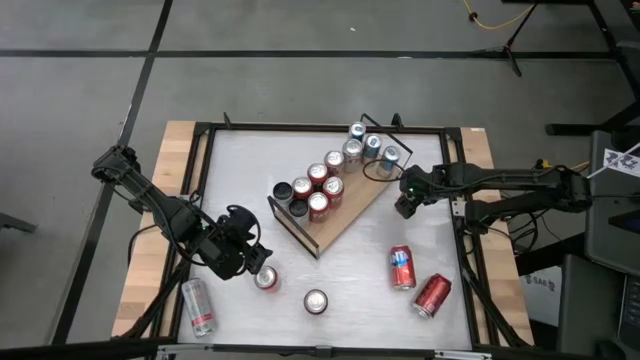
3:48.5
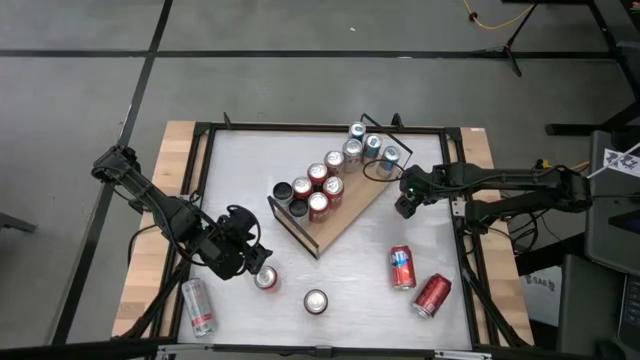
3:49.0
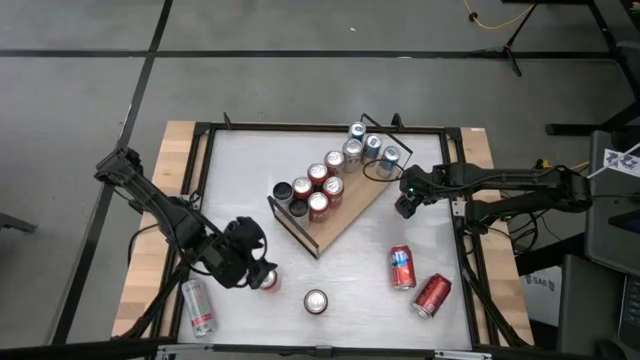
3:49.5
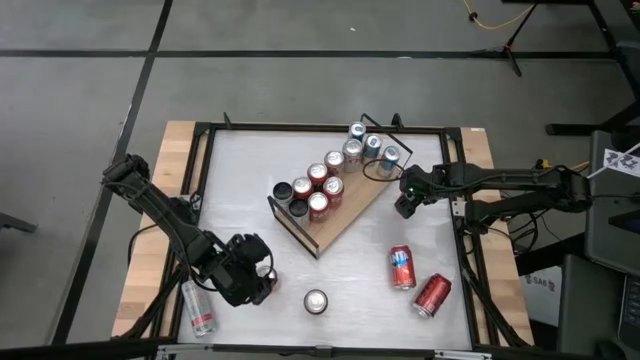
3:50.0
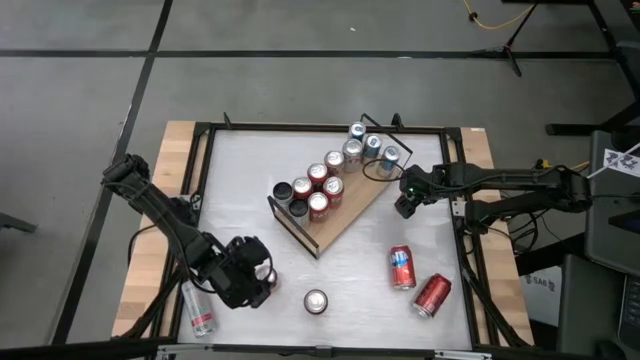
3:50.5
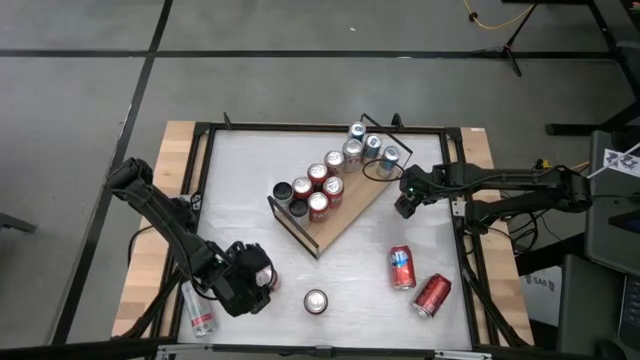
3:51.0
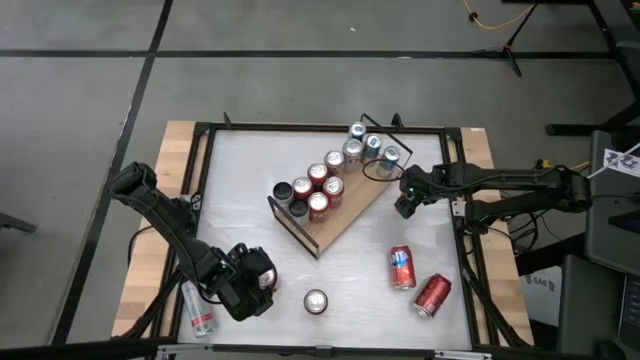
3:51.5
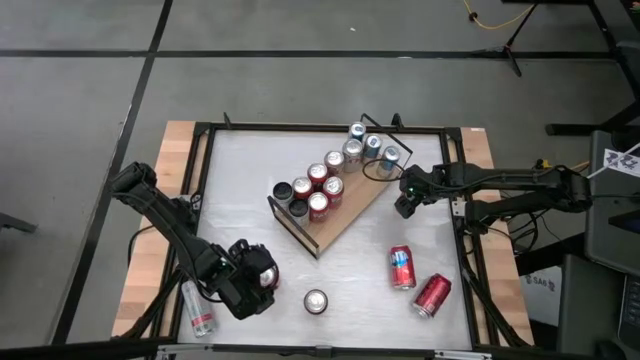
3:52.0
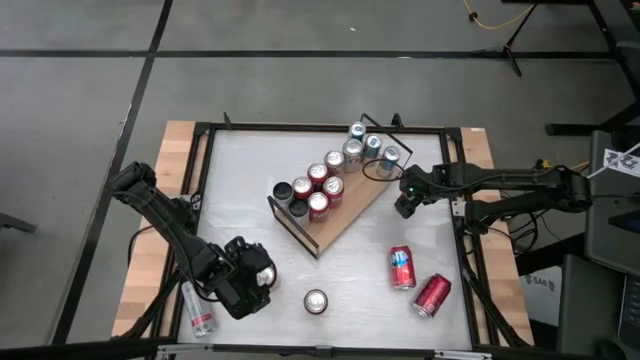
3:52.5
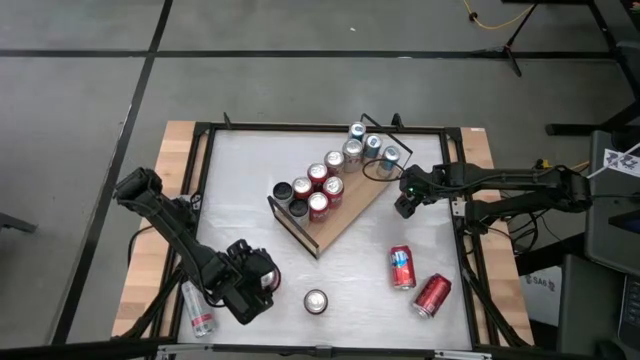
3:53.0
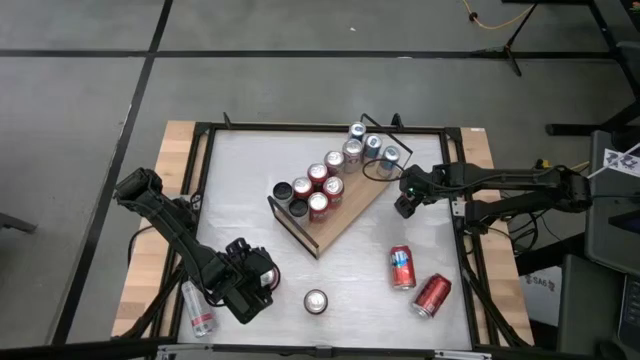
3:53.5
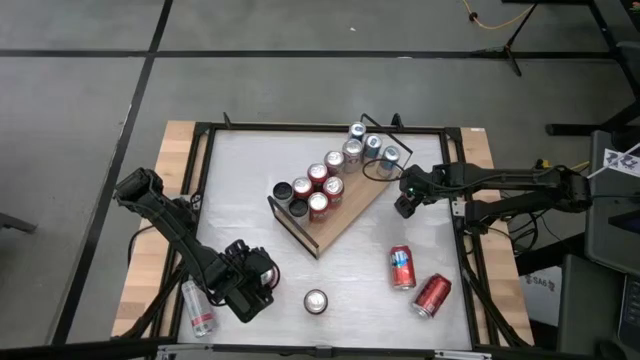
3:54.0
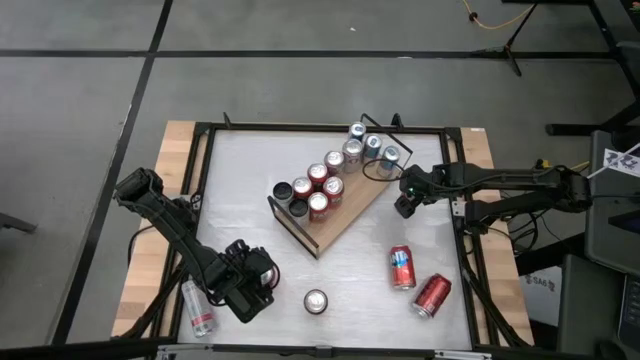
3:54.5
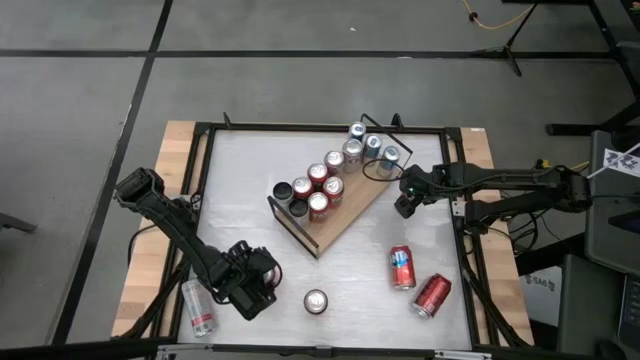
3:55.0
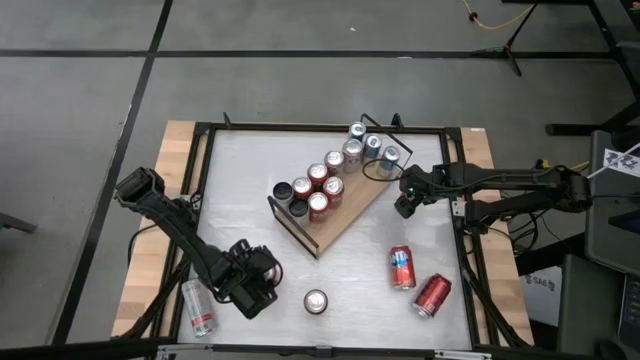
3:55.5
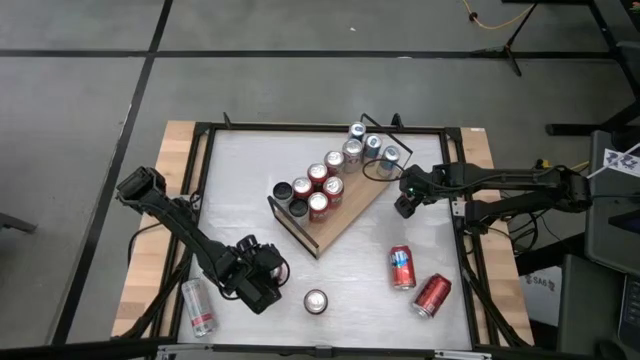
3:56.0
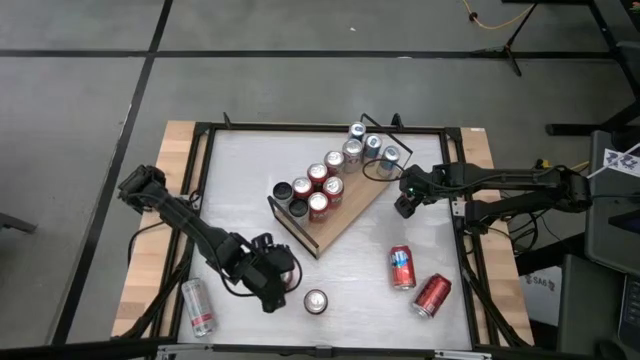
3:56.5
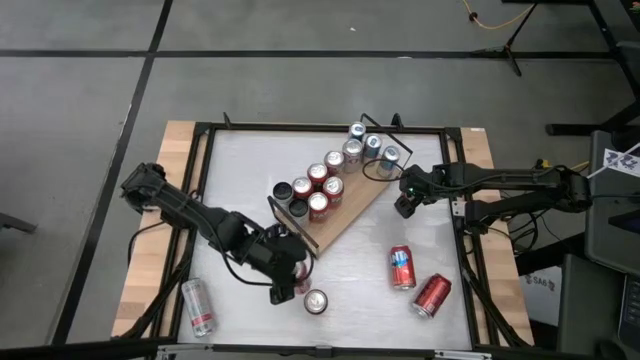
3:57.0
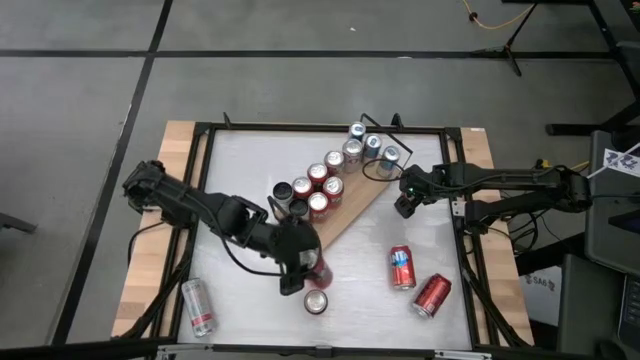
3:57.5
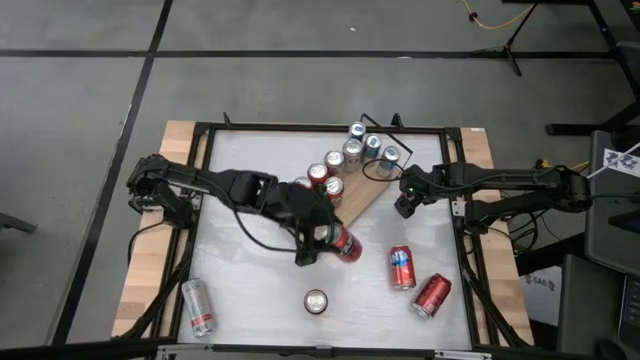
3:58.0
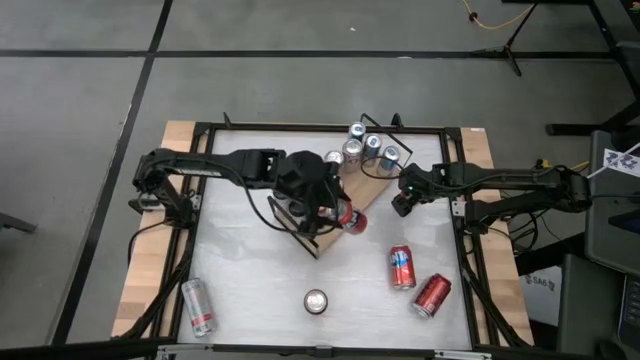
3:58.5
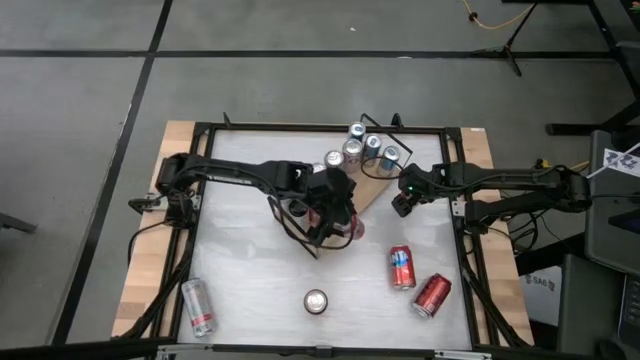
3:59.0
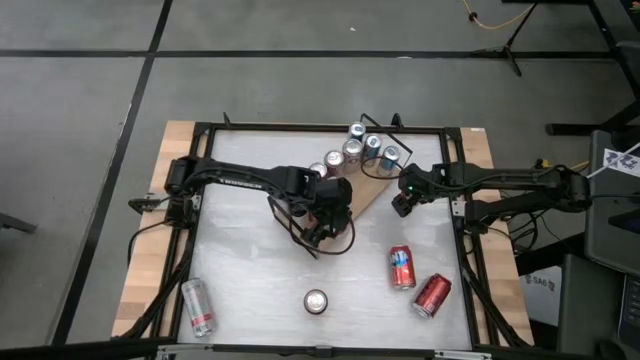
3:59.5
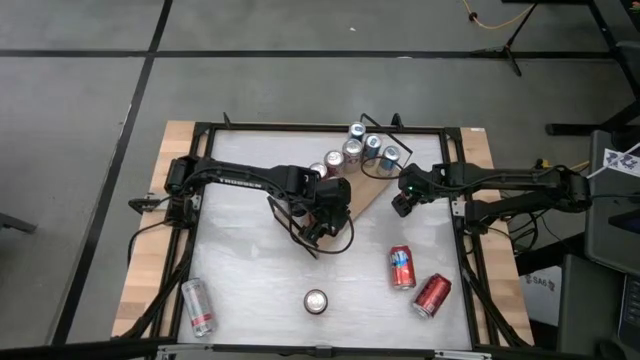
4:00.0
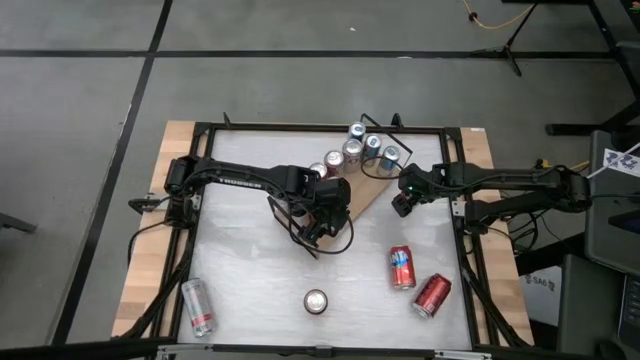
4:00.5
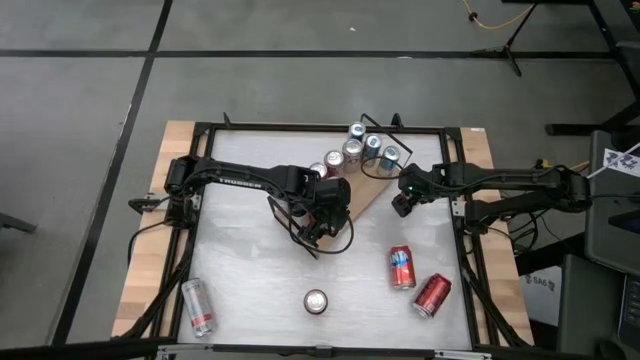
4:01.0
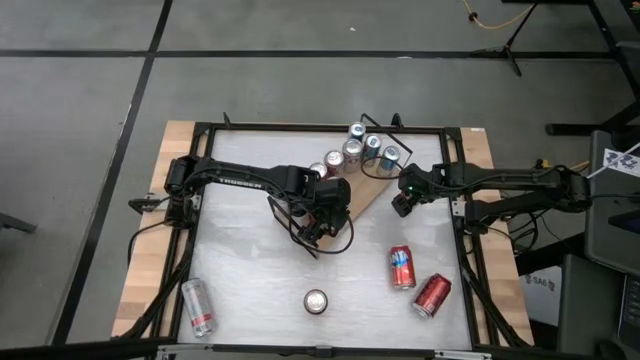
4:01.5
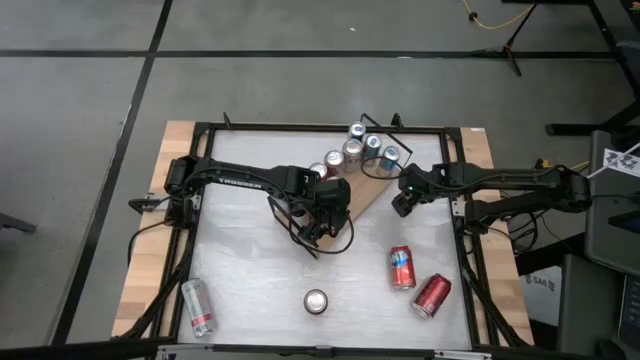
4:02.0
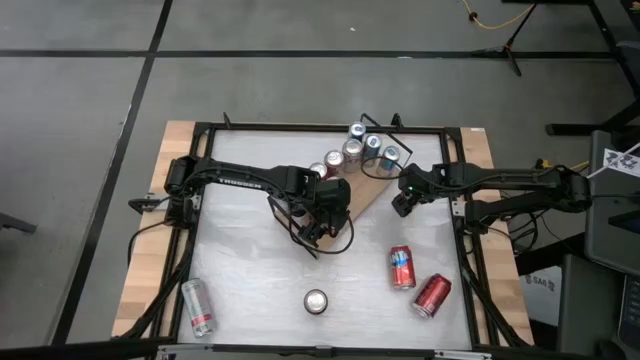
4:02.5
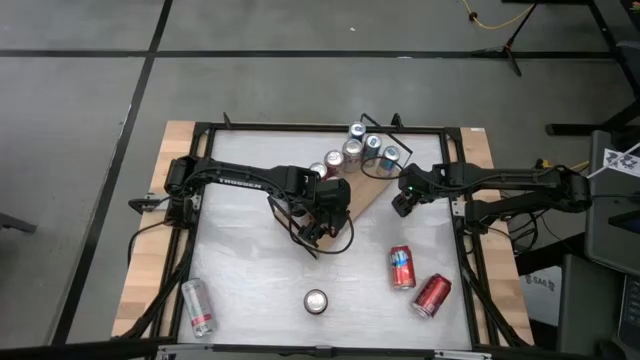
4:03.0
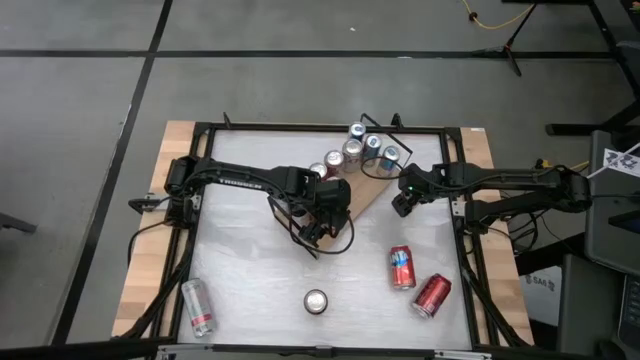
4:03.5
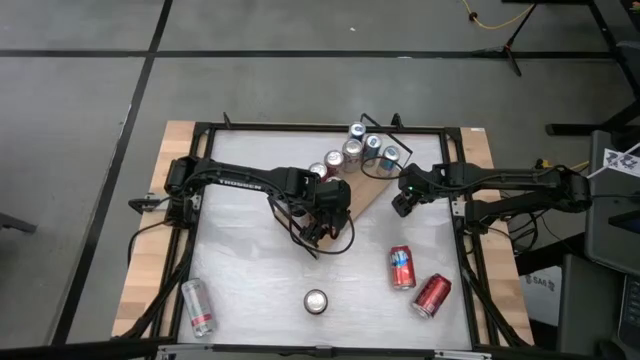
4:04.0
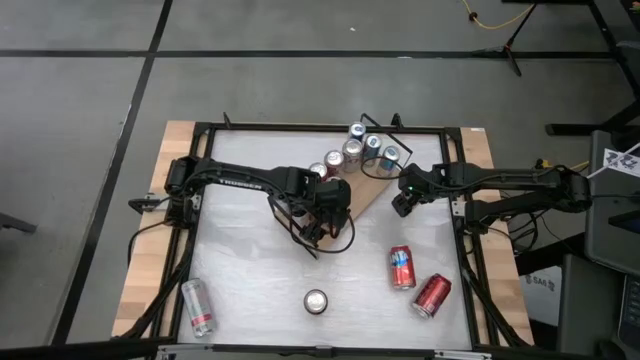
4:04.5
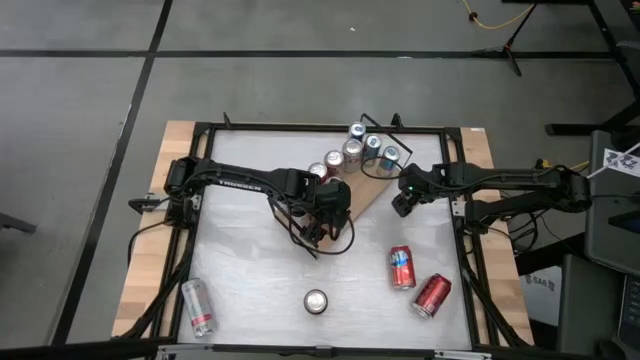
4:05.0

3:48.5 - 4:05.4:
Task: Place canned beverage on shelf
Put the orange soda can on the shelf aligned with the other orange soda cans

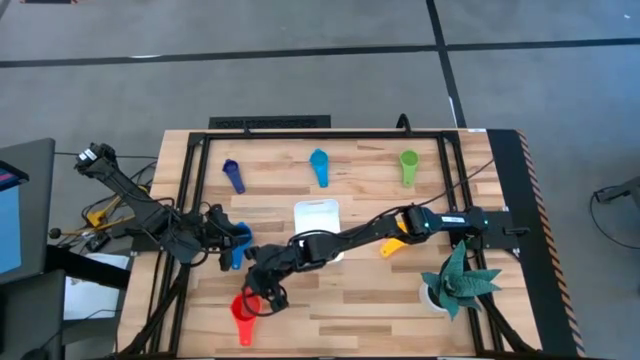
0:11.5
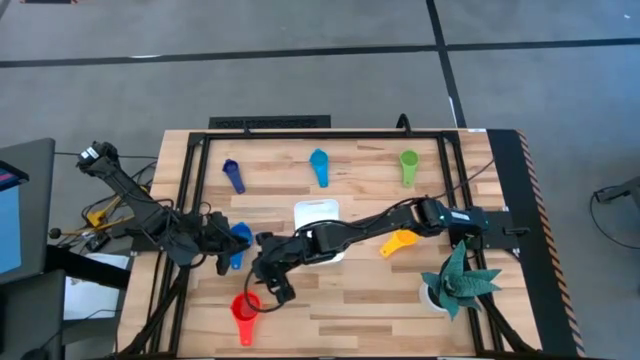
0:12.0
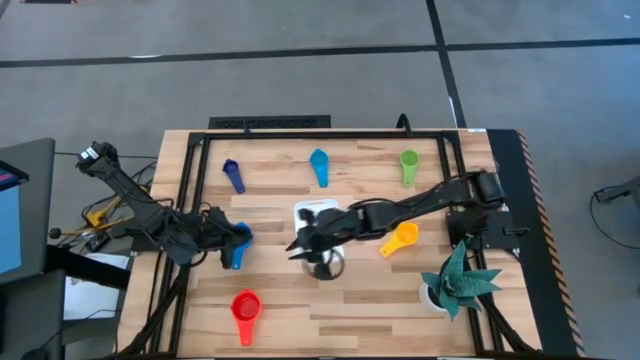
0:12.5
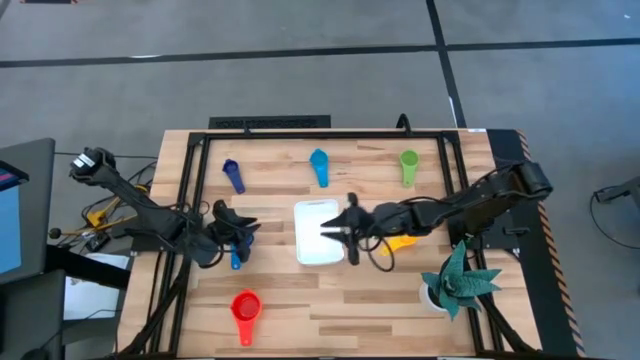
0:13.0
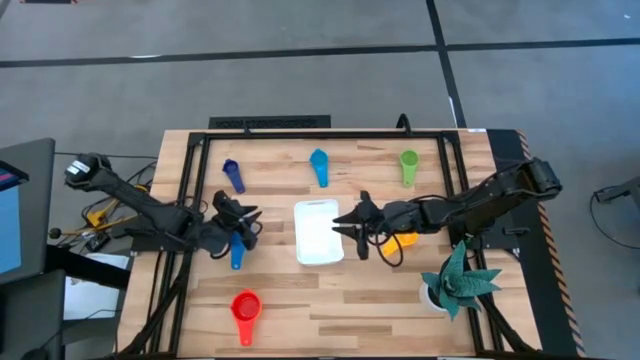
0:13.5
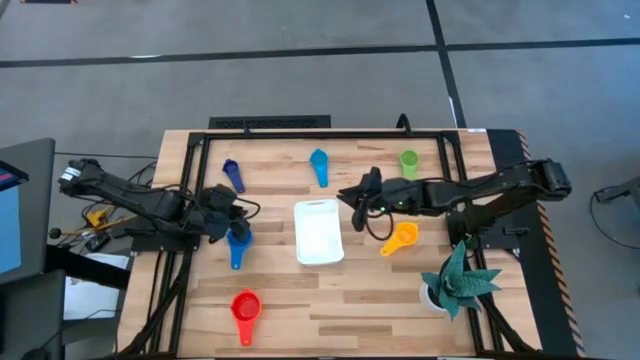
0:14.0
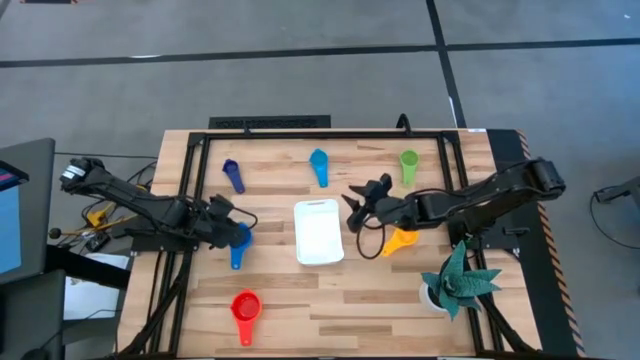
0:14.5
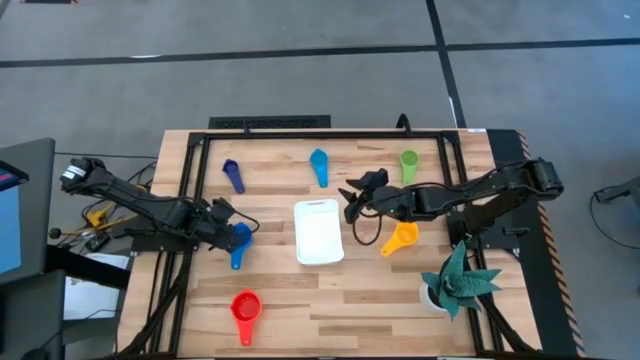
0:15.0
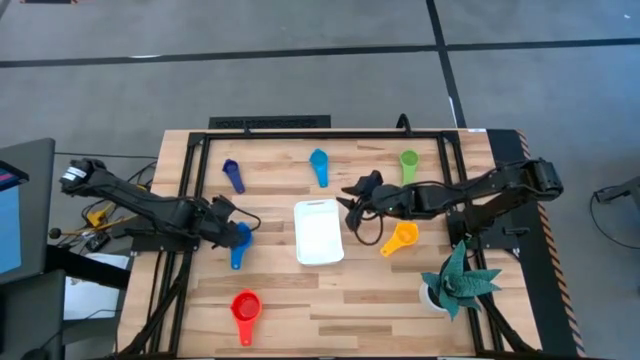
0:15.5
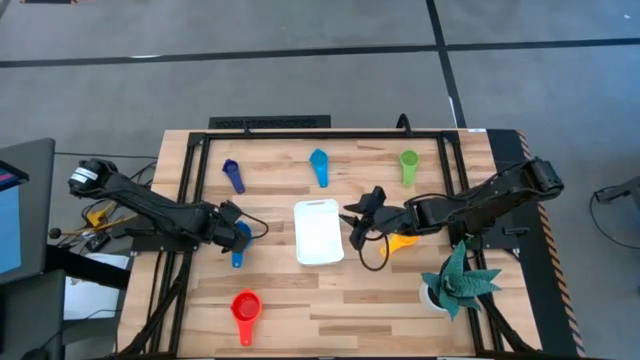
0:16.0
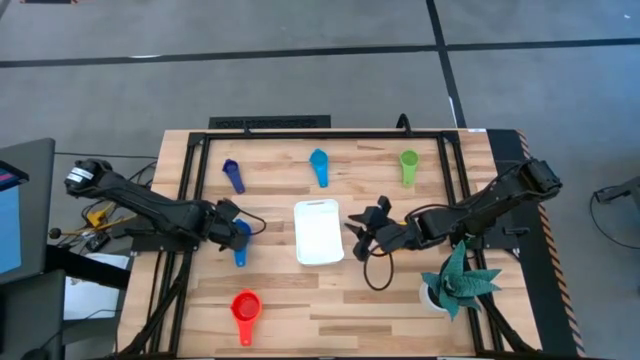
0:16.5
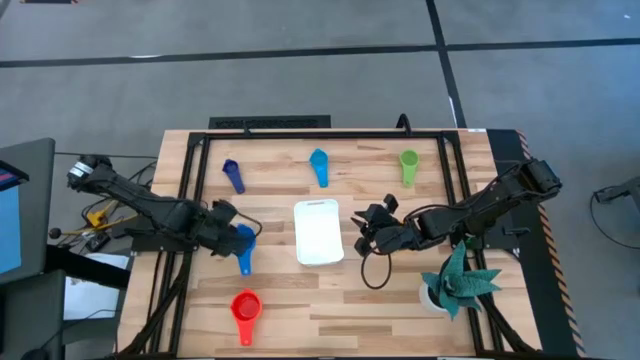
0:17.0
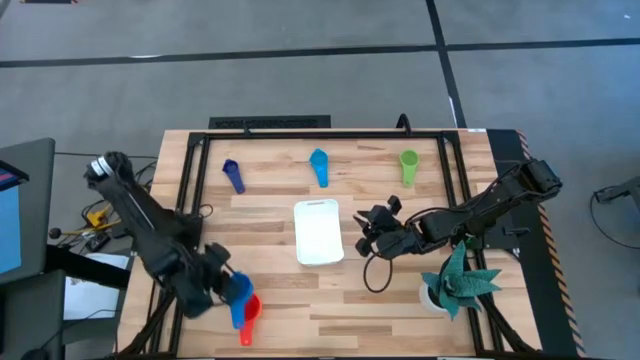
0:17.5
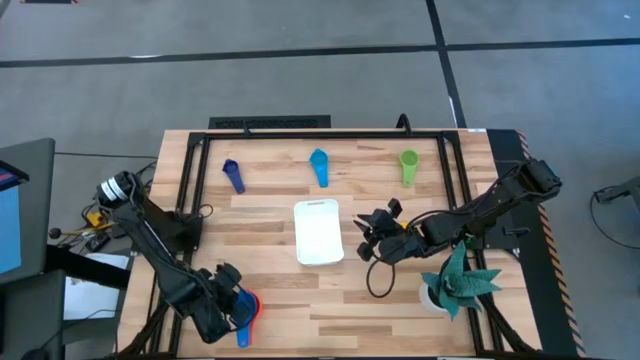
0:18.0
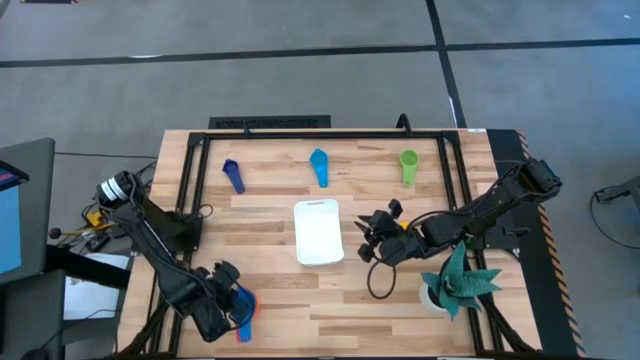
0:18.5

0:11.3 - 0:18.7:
Task: Nest measuring cups in basket
Stack the light blue nest measuring cup into the red nest measuring cup
